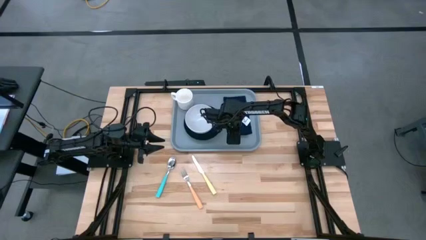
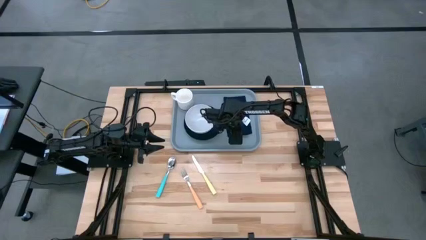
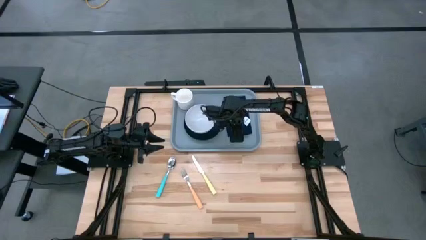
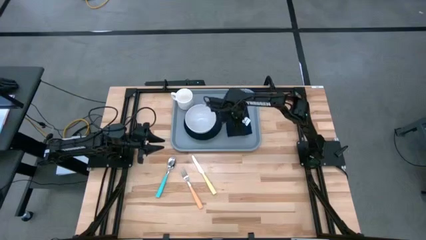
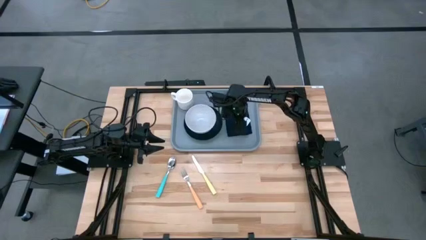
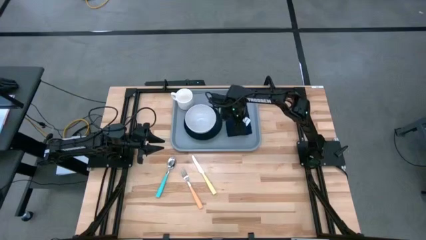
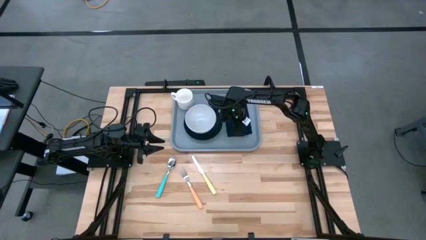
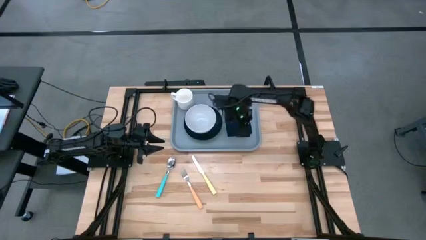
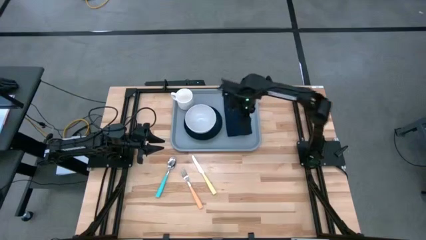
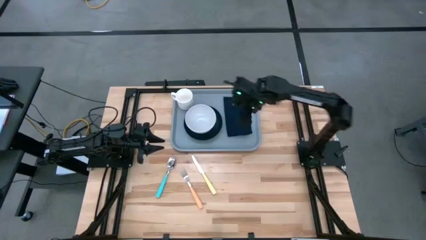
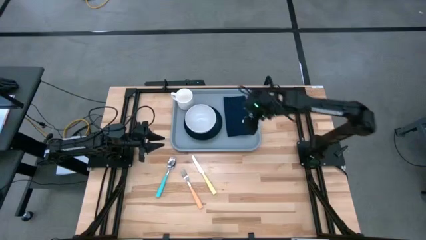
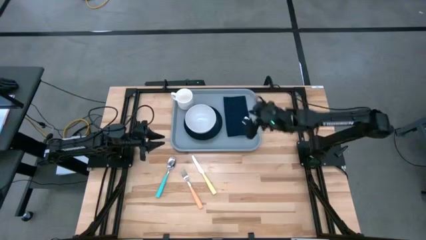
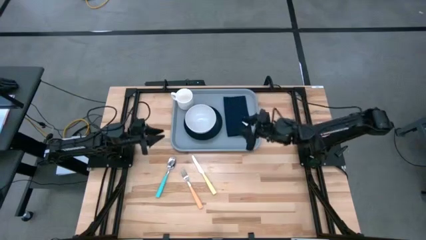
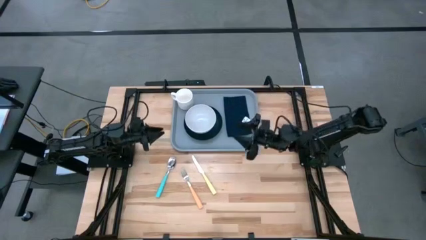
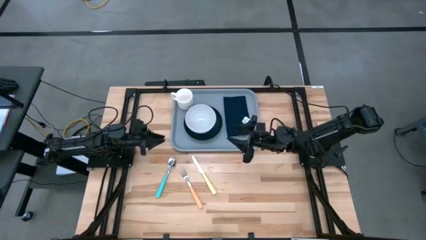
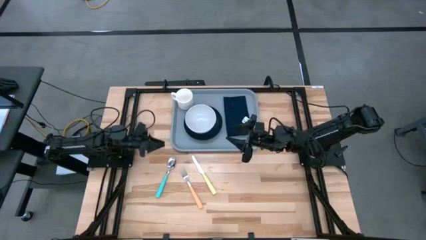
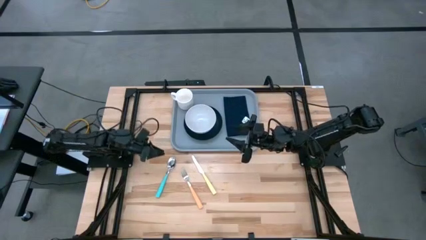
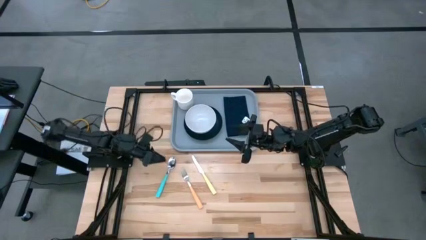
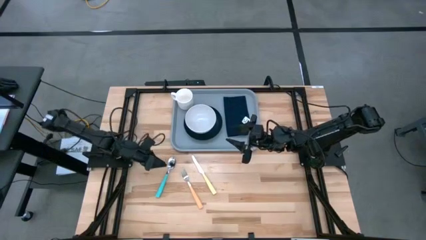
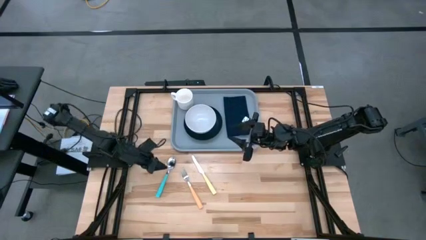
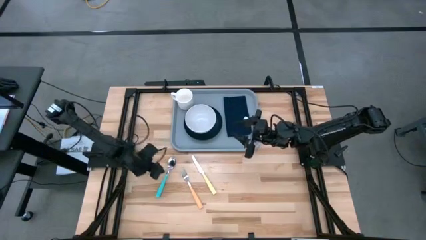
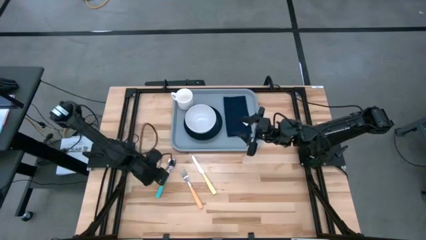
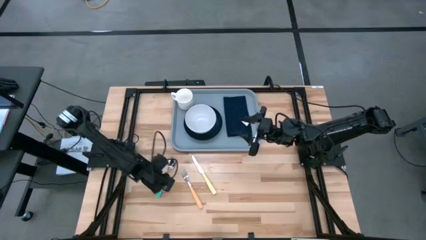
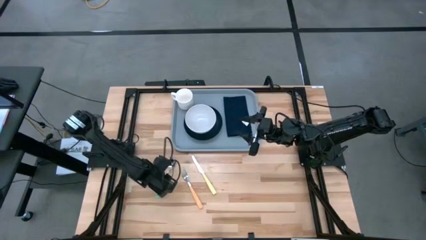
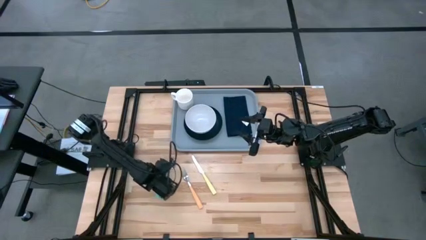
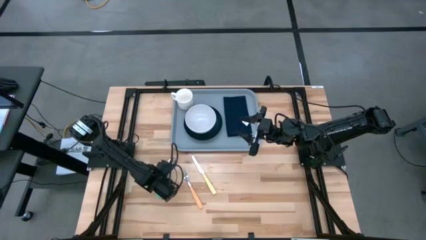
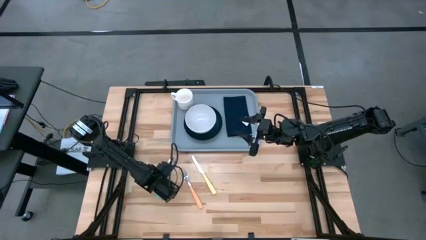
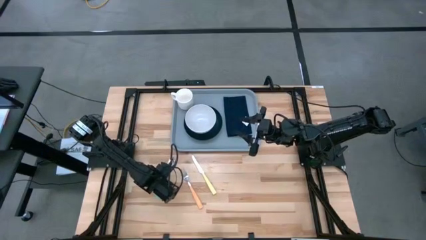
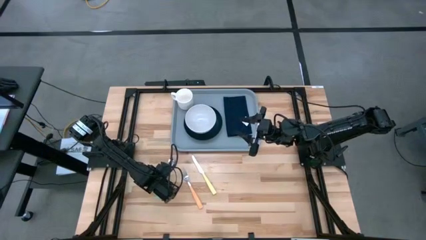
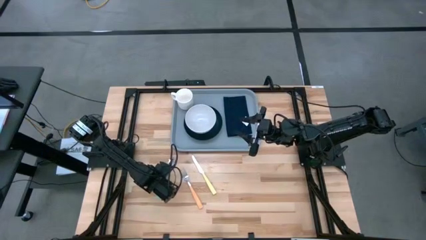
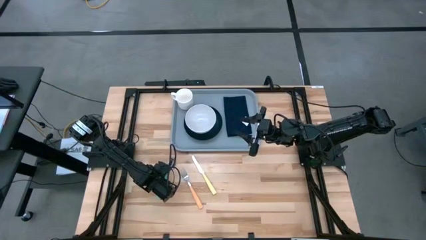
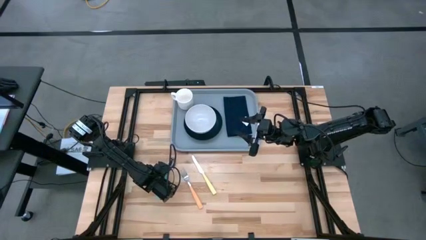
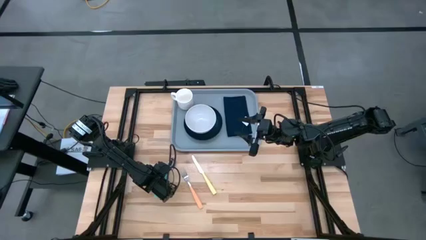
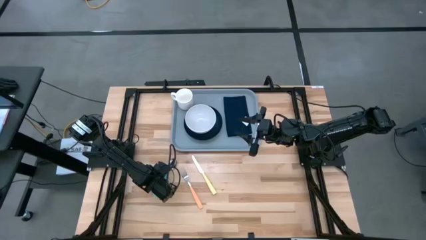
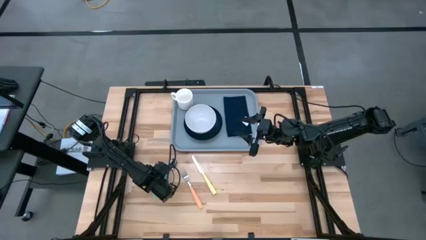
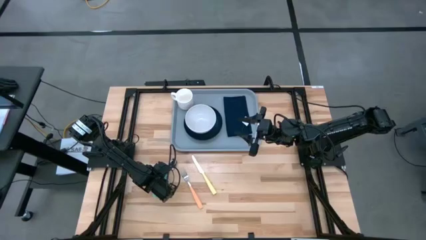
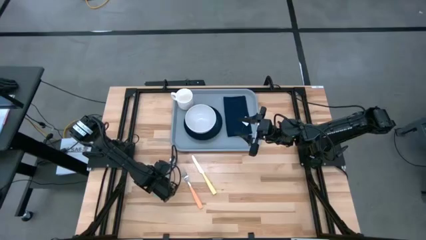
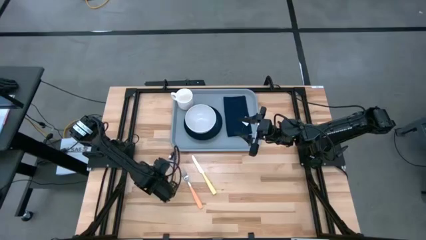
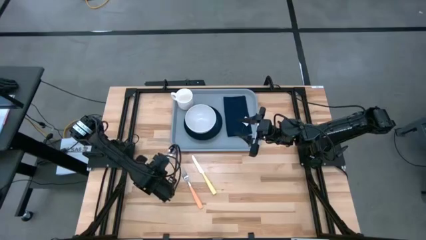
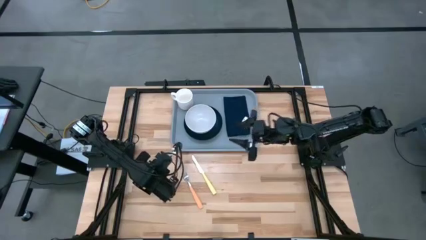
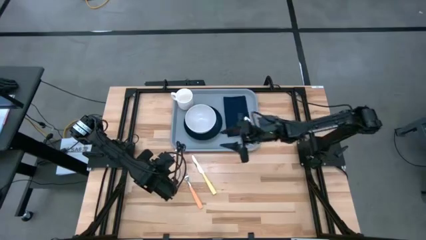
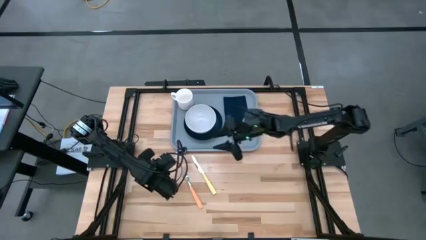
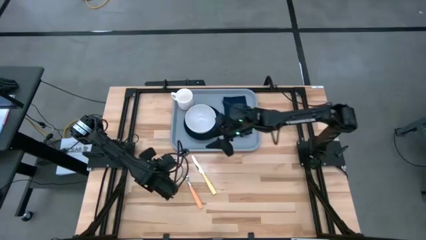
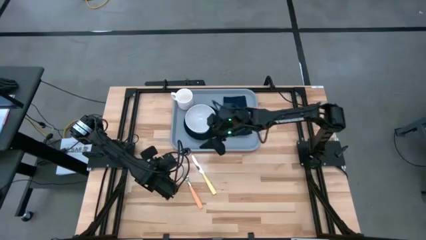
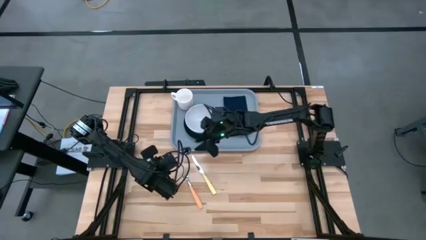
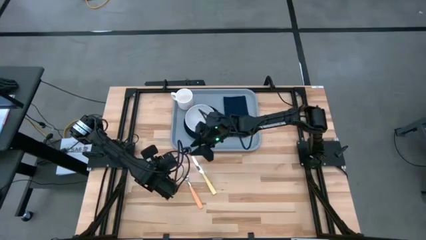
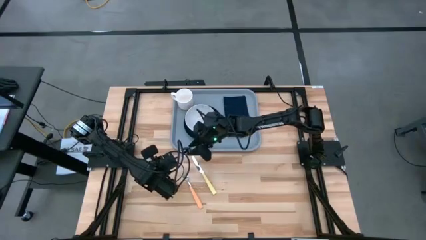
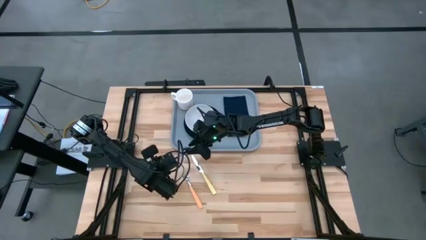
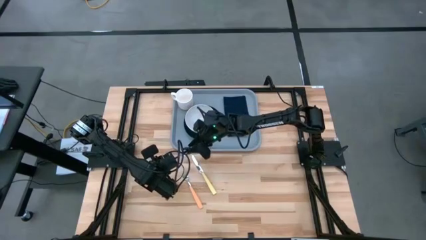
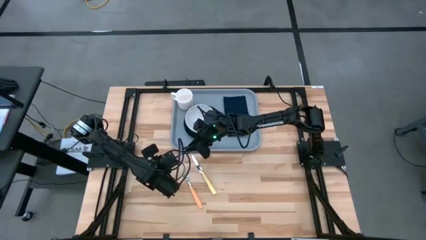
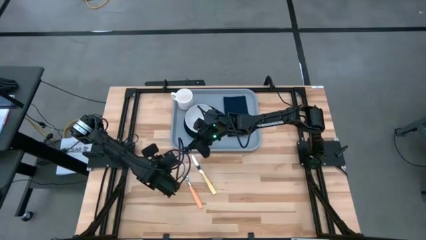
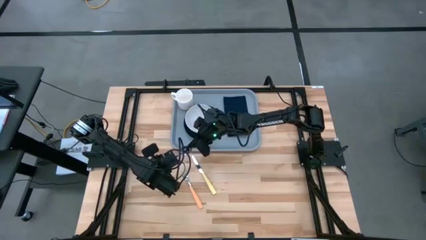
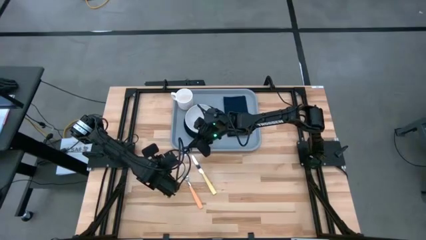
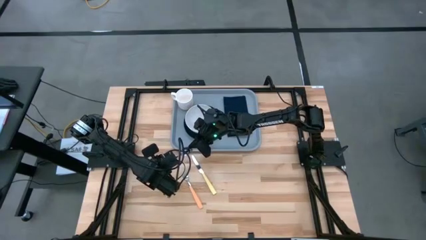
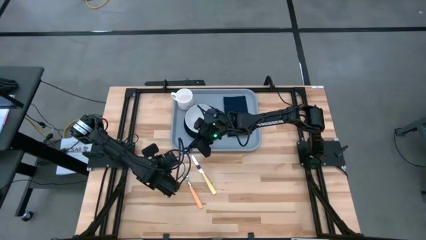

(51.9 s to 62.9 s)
Task: Set up tray
Put the blue spoon on the black napkin

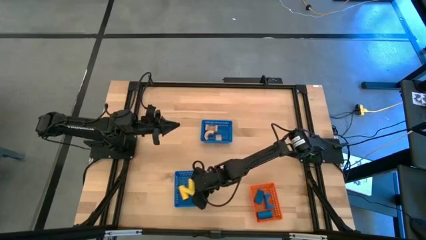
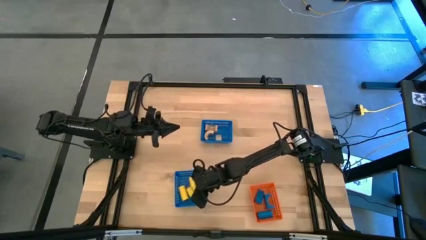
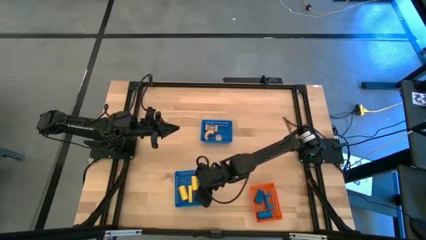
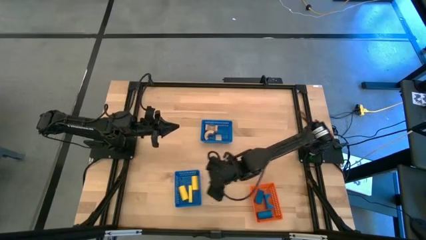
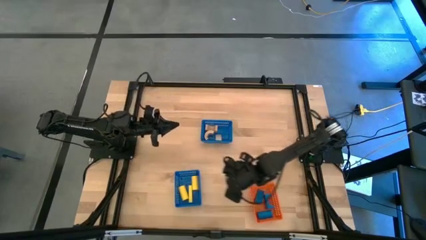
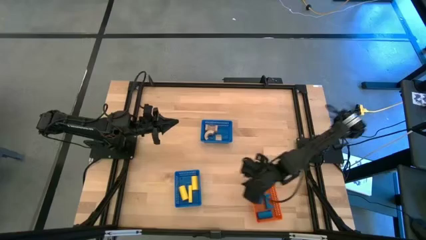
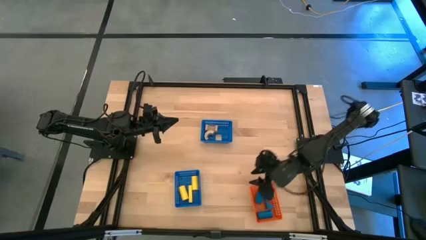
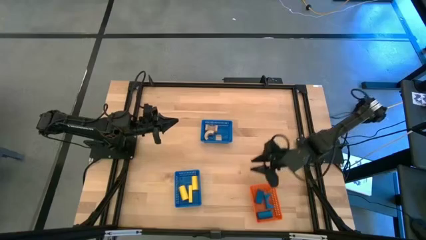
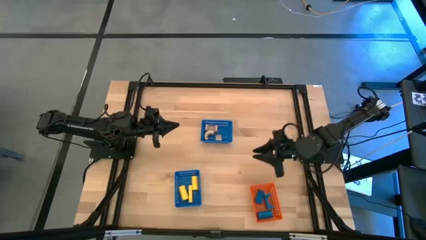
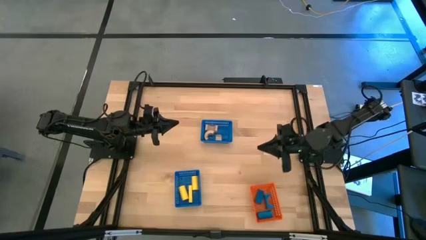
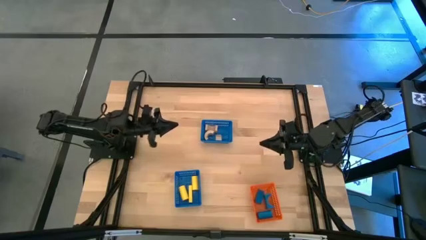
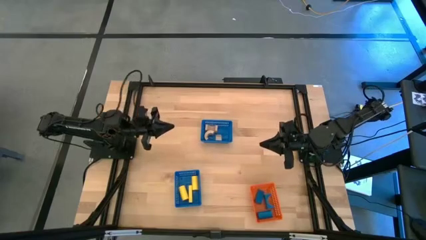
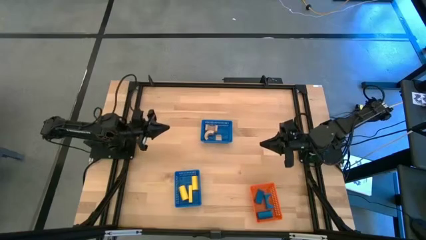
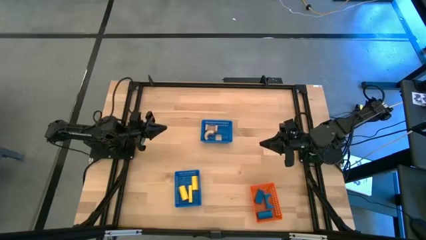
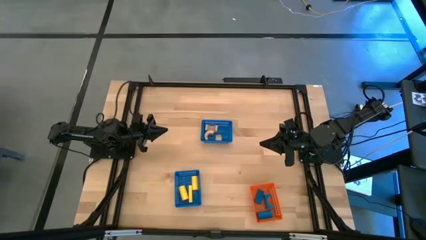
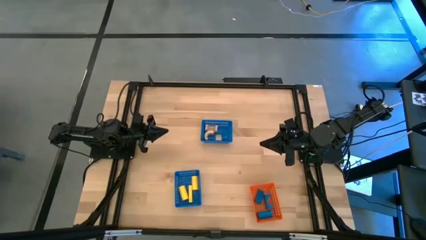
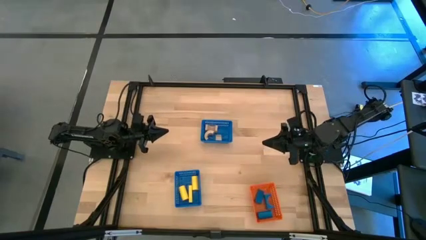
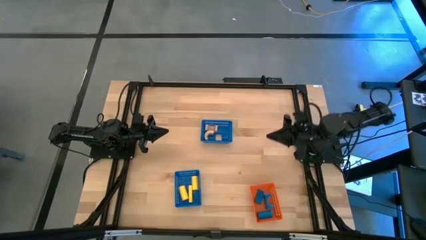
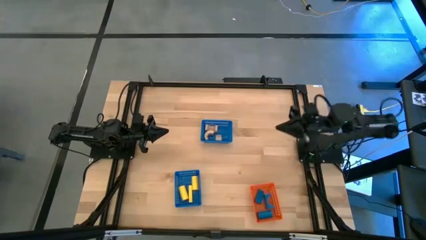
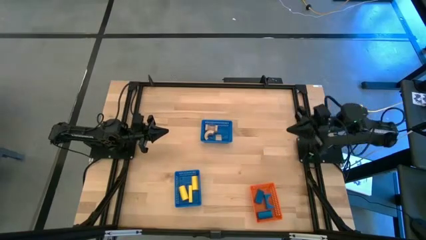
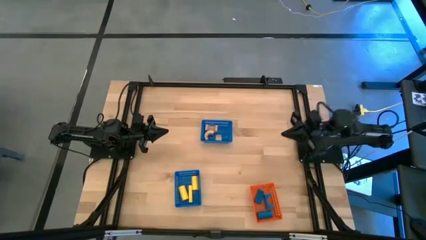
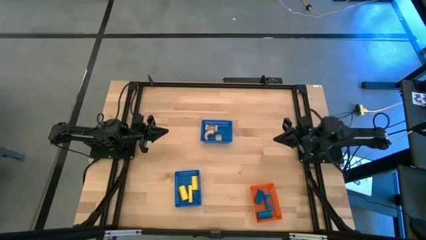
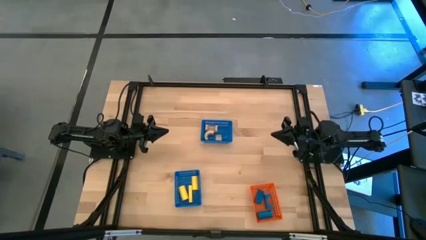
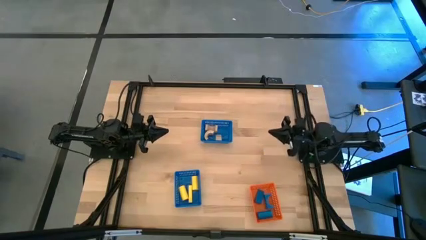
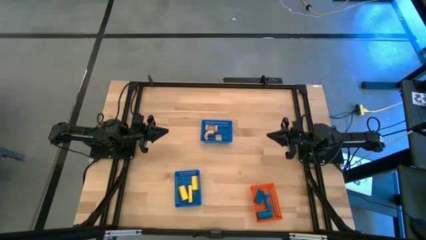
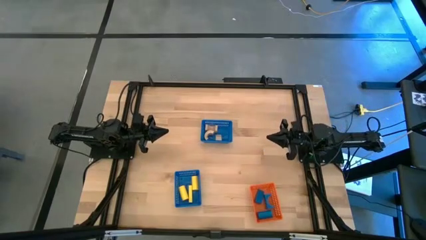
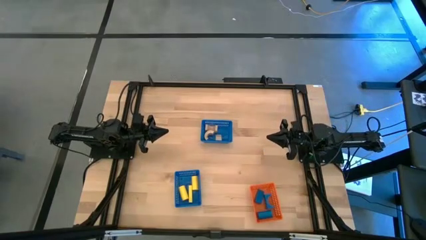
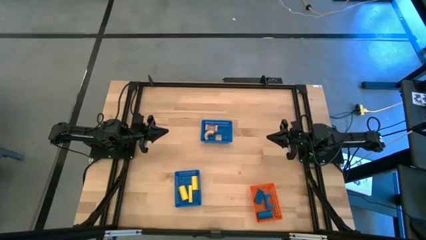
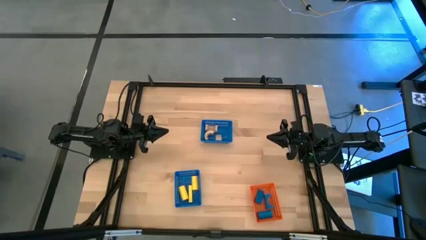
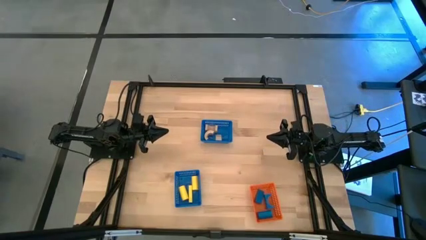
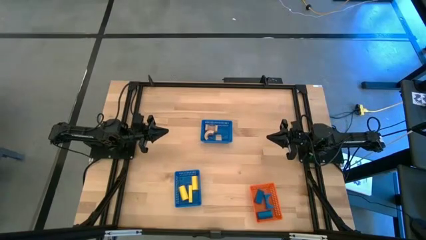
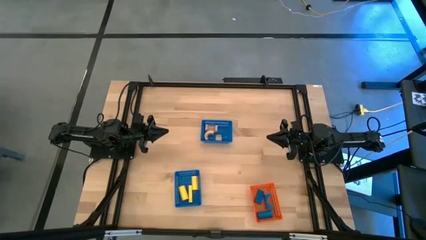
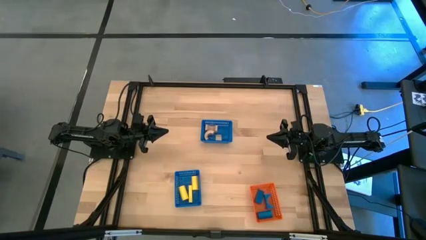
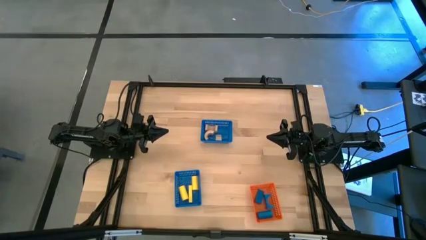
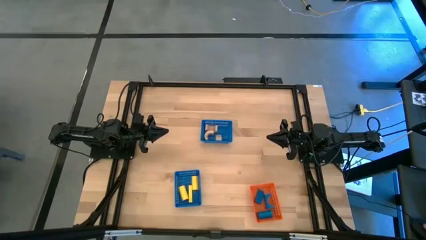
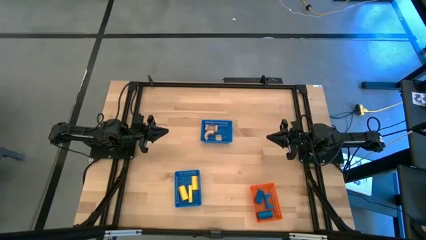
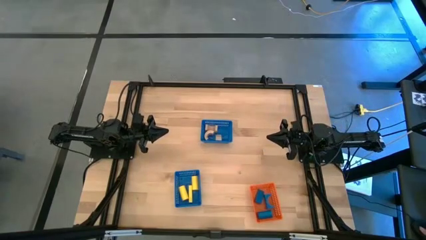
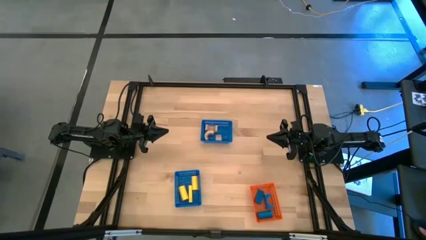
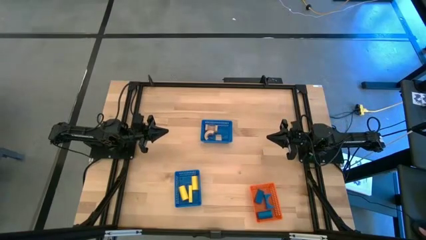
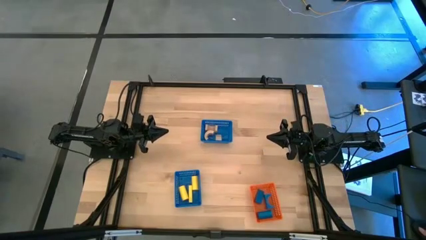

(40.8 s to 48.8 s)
Task: Sort & place blocks by color
Return to Home Position
